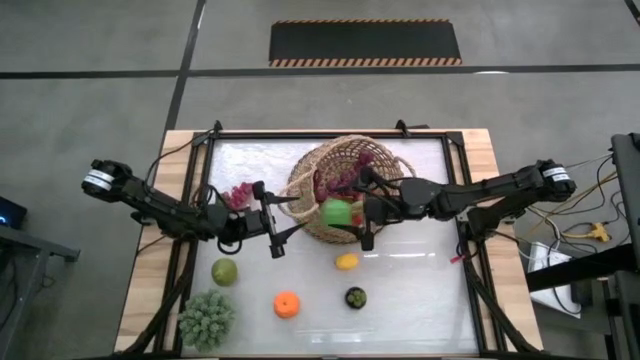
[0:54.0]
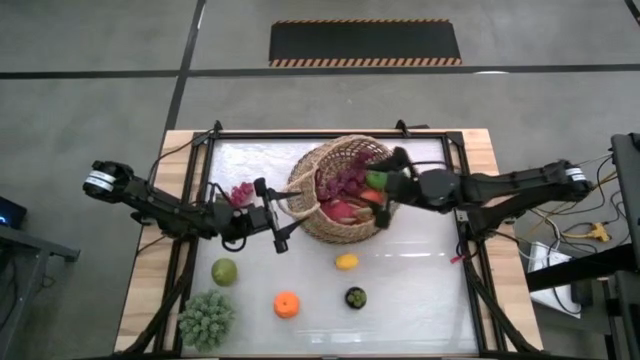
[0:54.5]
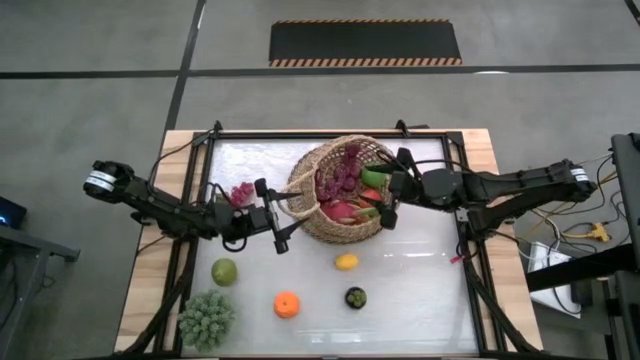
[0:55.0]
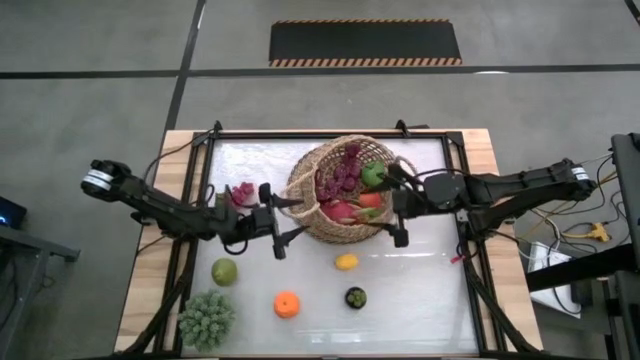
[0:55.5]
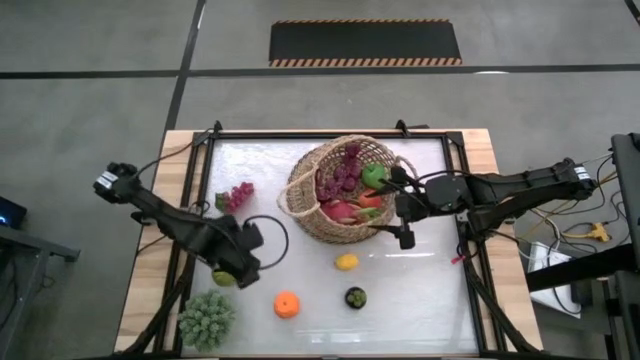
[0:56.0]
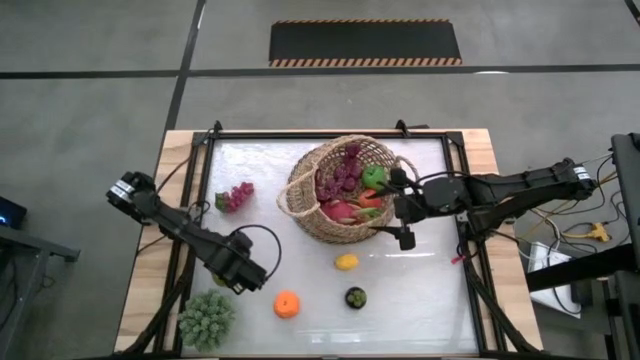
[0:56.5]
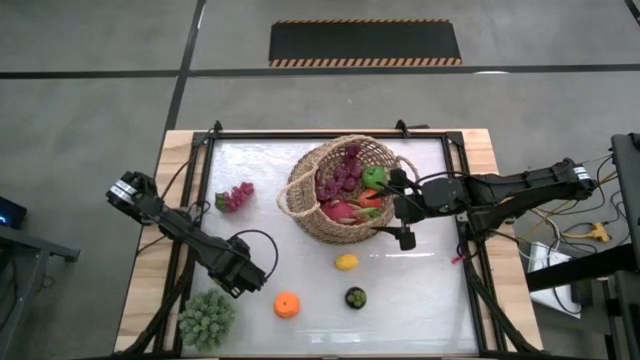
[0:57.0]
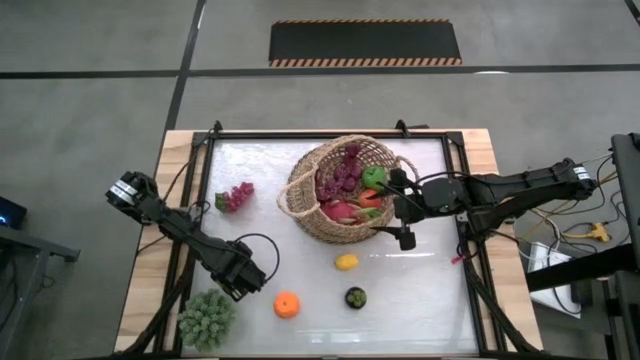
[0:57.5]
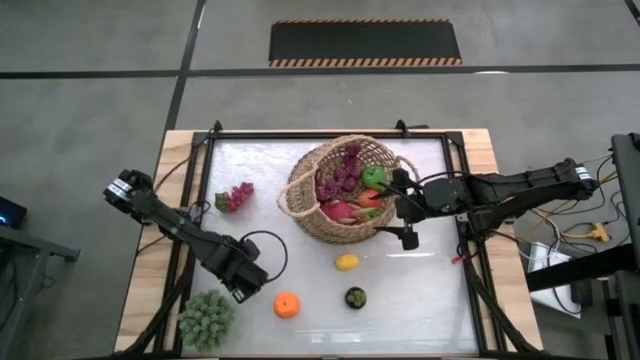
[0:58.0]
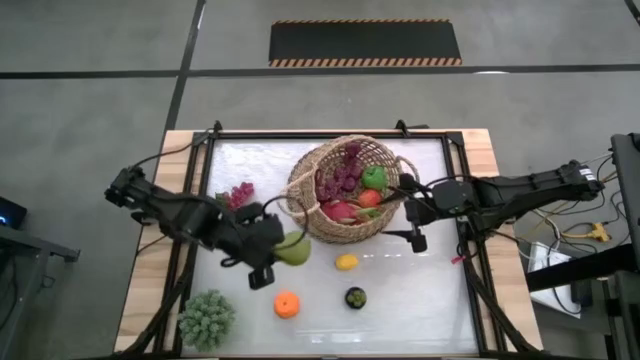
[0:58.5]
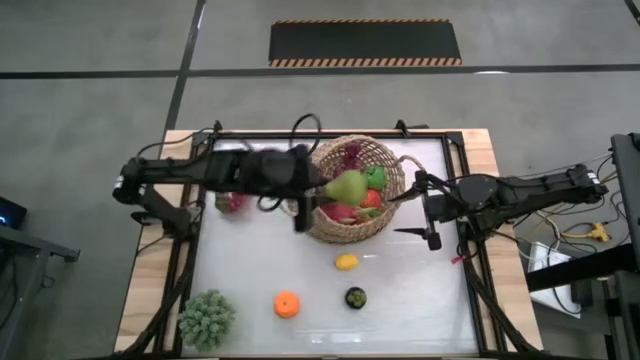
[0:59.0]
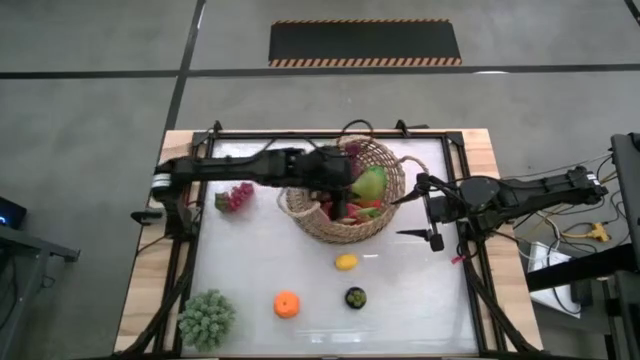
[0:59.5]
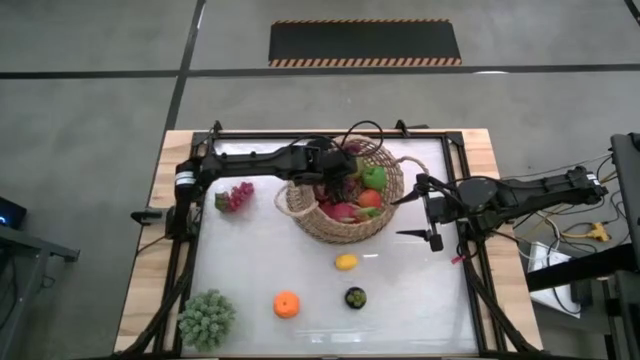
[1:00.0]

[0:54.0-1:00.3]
Task: Build produce basket
Put the green pear into the brown basket

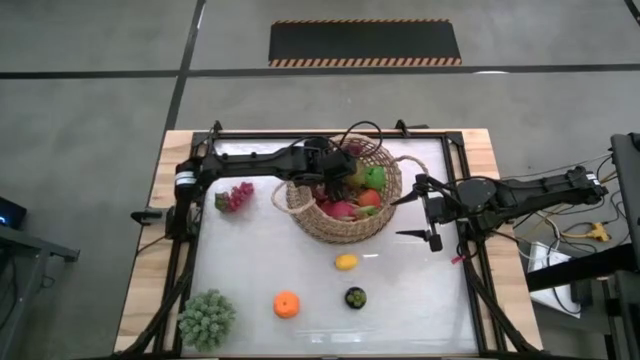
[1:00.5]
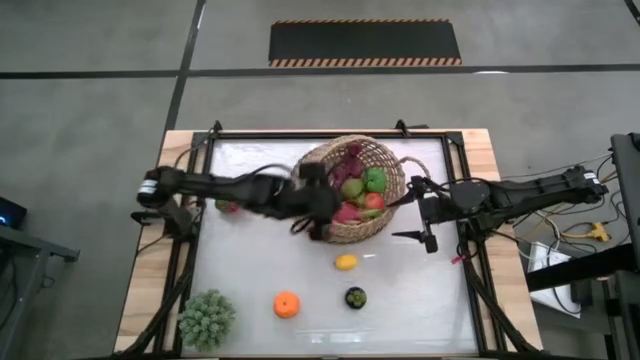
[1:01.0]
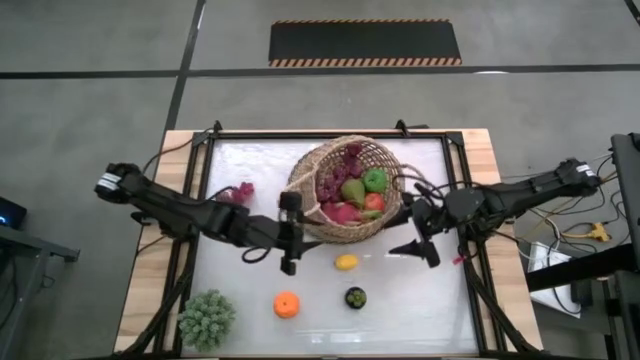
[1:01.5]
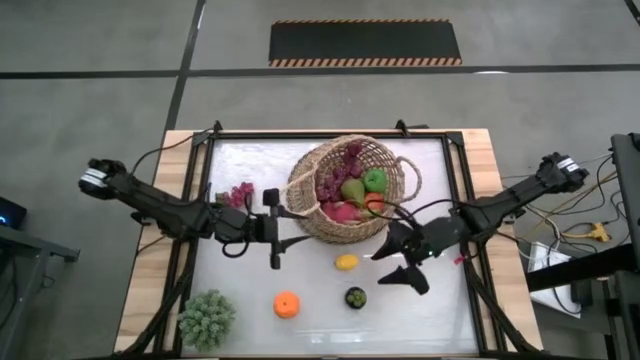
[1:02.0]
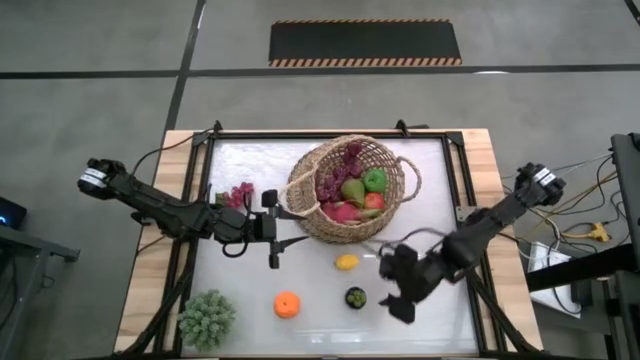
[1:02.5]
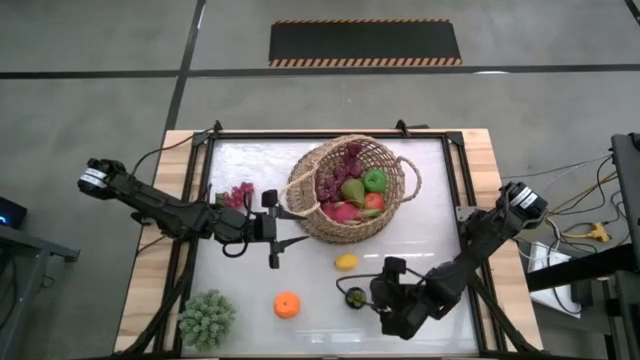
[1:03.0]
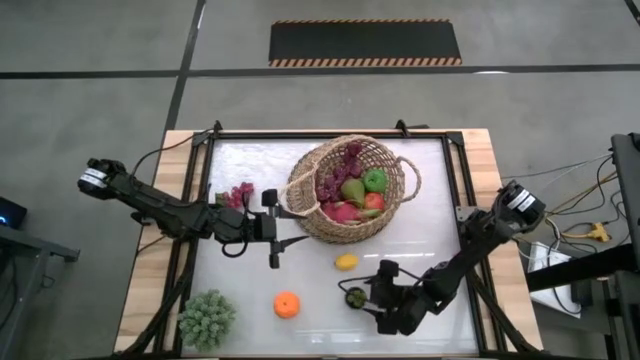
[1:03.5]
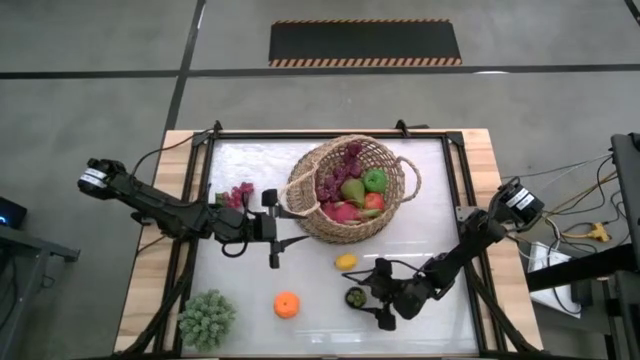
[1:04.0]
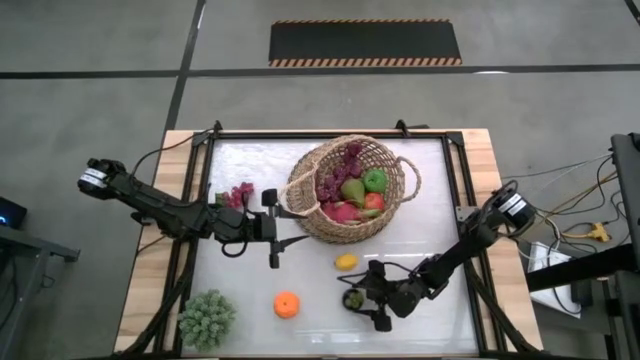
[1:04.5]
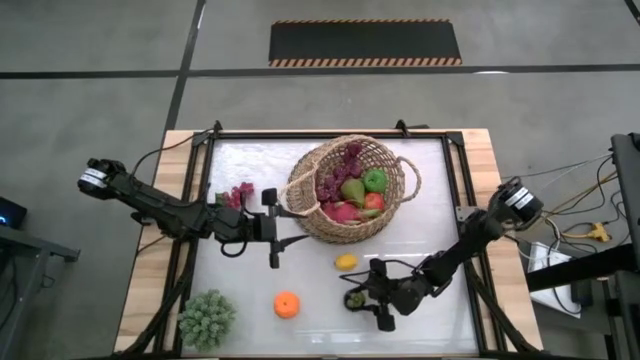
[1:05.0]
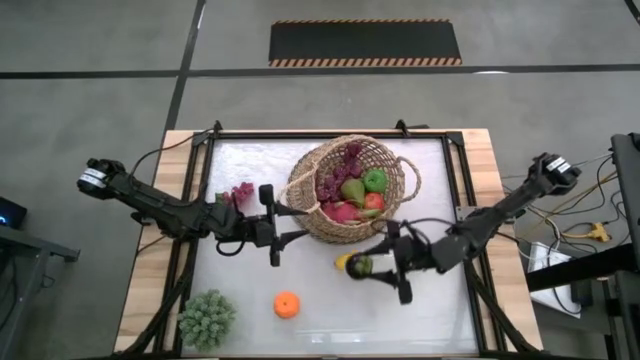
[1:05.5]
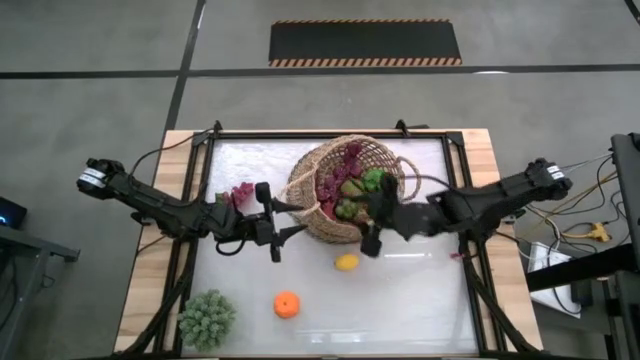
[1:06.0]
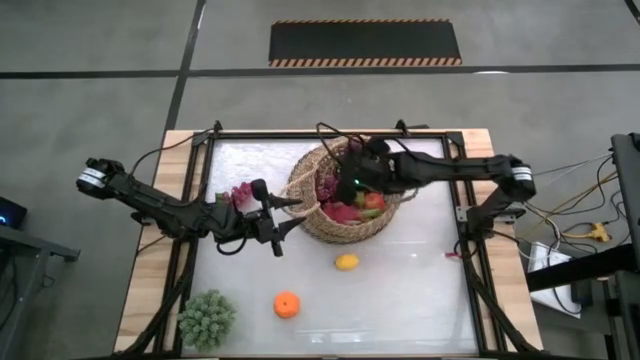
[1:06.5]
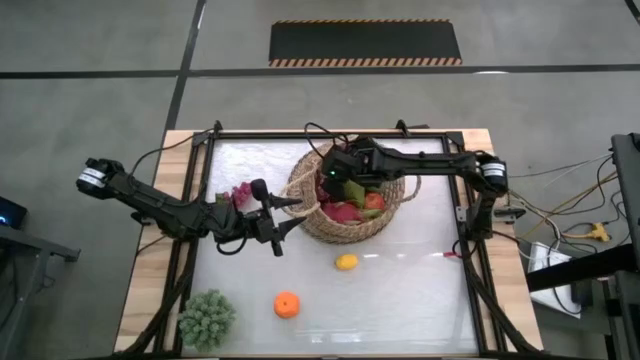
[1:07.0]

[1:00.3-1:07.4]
Put the purple mangosteen into the brown basket

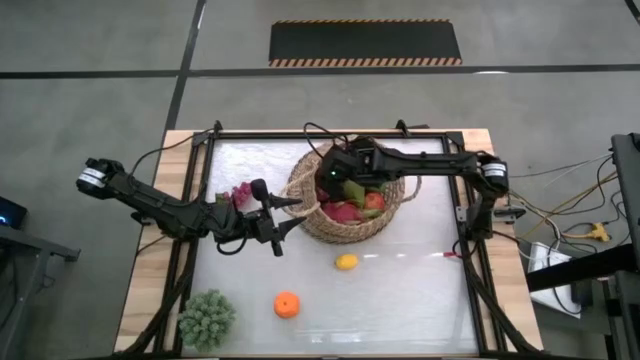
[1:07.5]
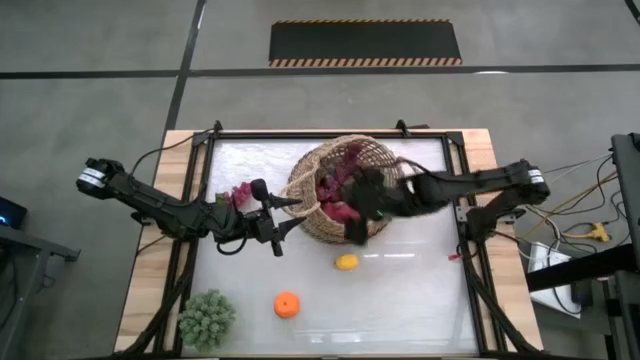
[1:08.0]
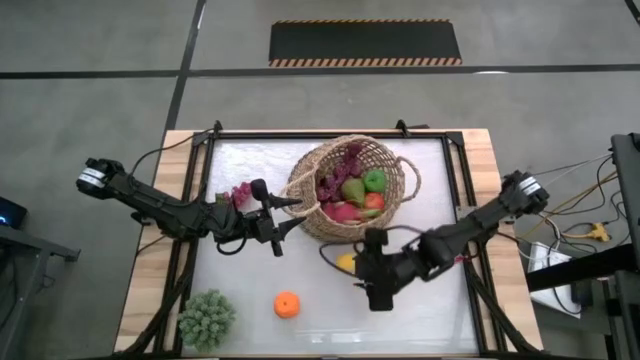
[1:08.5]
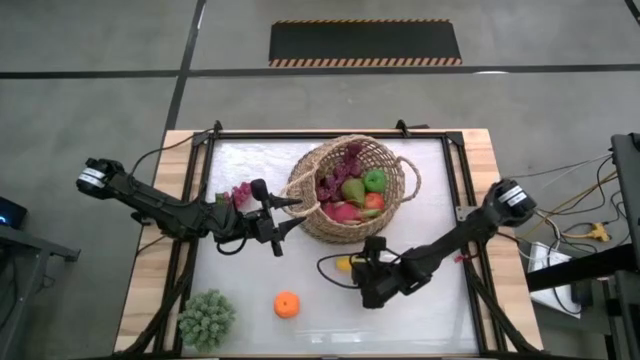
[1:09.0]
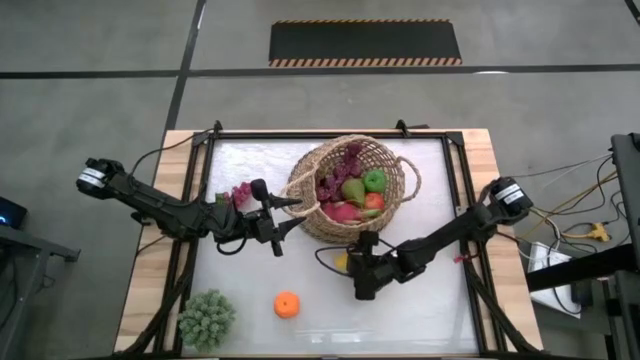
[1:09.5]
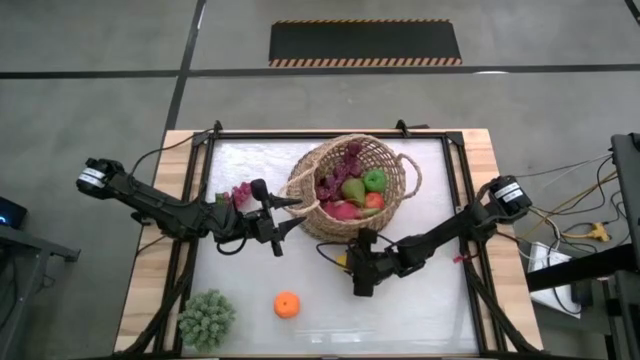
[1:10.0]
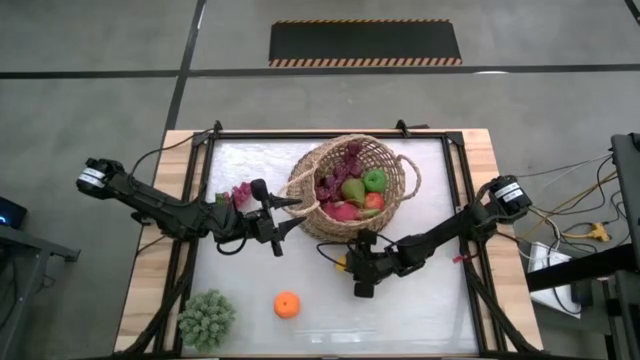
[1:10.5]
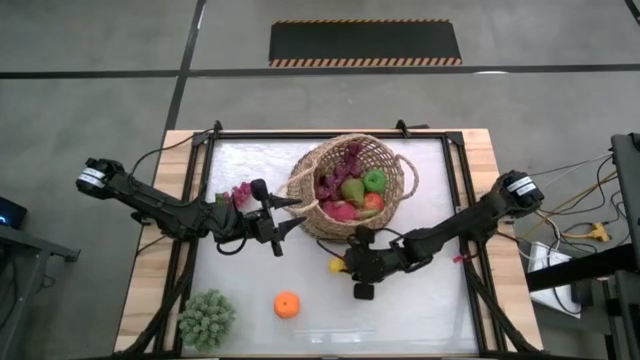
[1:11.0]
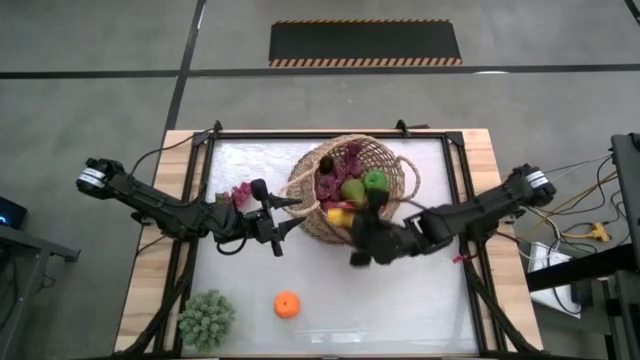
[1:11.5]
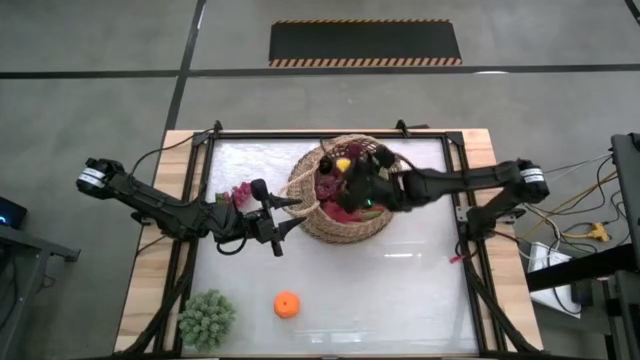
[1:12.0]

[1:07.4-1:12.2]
Put the yellow lemon into the brown basket

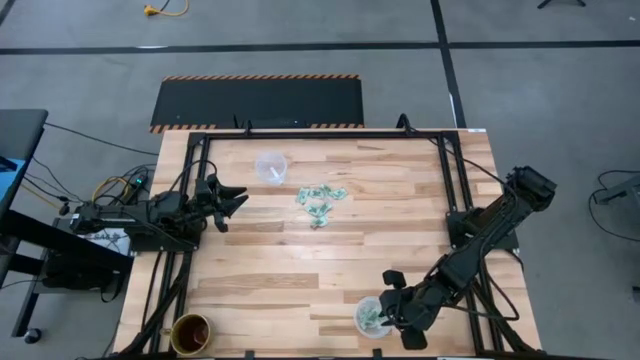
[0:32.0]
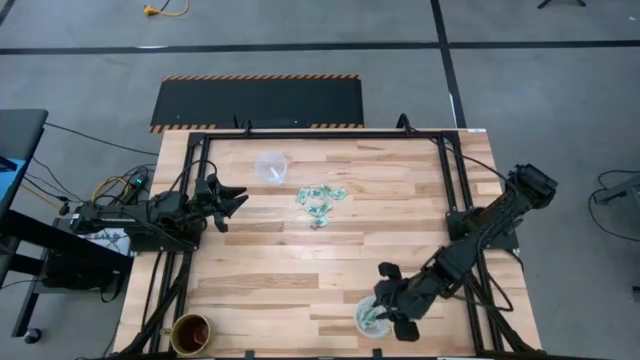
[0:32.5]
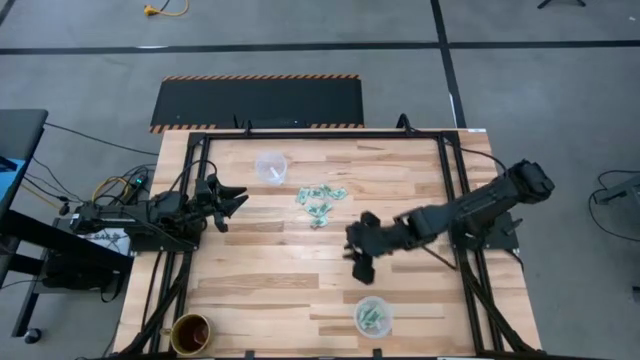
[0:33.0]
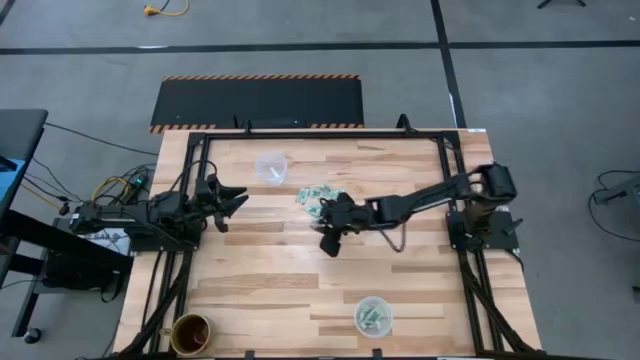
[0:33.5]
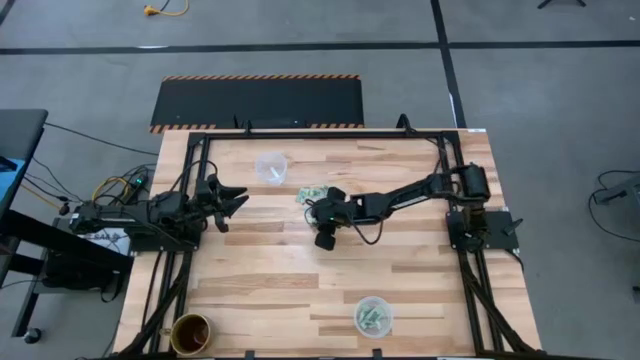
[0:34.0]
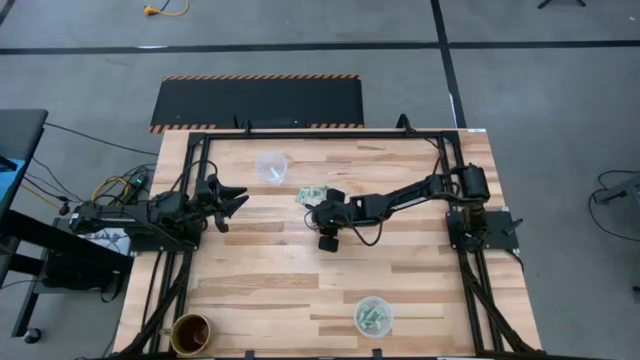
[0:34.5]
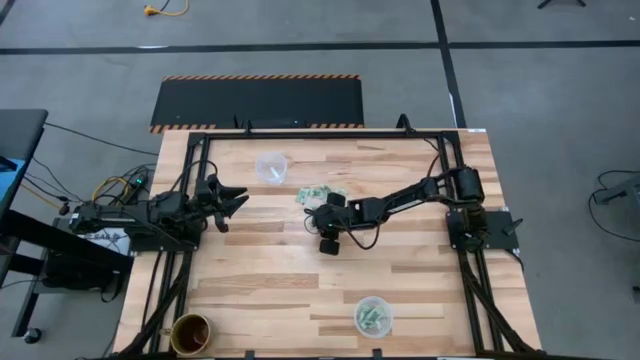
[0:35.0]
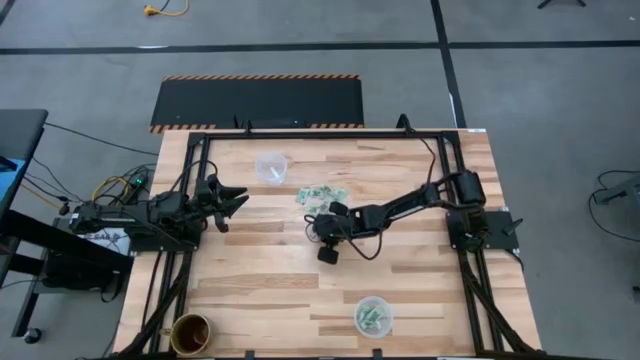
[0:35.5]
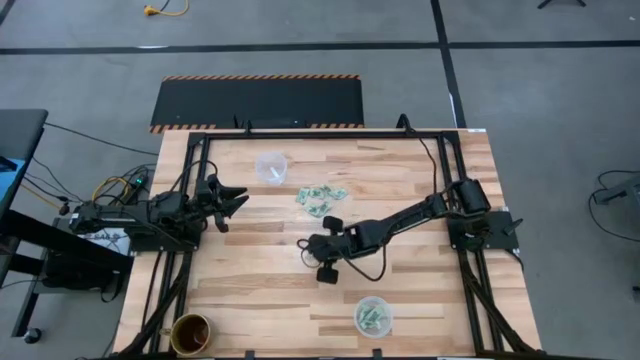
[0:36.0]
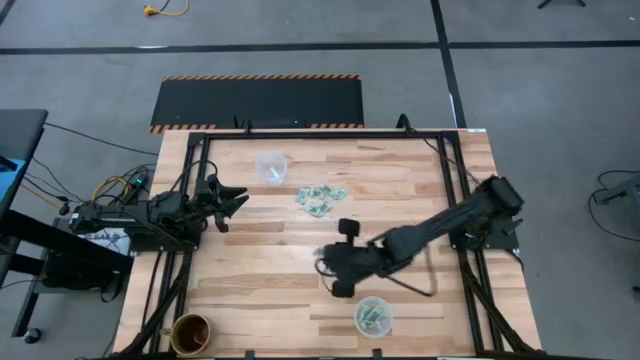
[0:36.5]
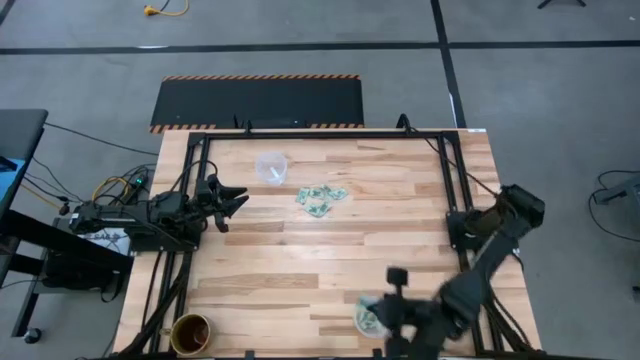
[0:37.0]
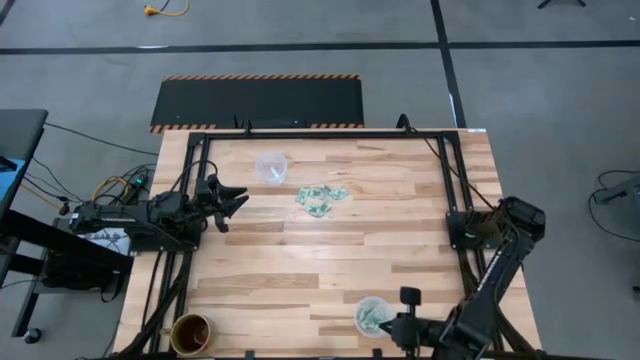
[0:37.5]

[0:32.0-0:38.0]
Task: Pick and place Stevia / Truvia into bins
Put the white stevia packet into the bottom transparent container
